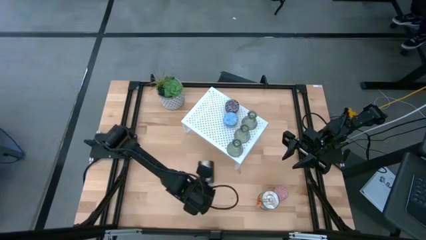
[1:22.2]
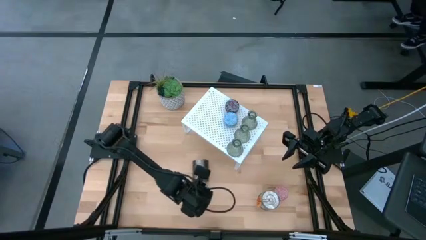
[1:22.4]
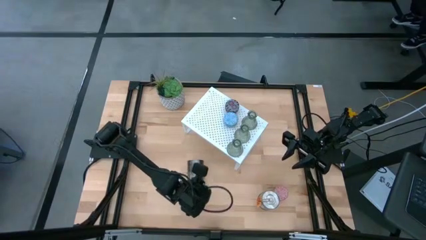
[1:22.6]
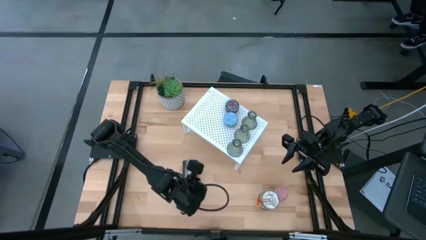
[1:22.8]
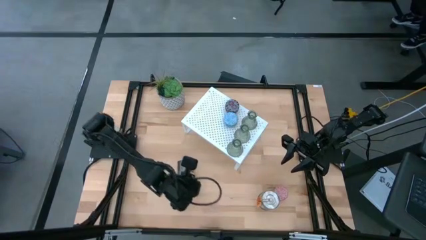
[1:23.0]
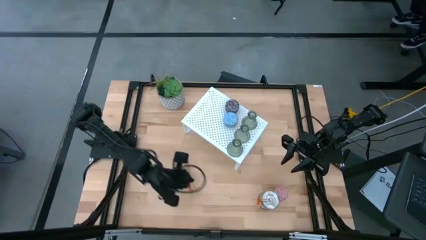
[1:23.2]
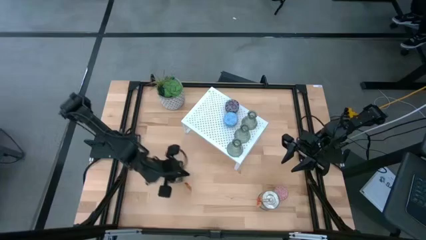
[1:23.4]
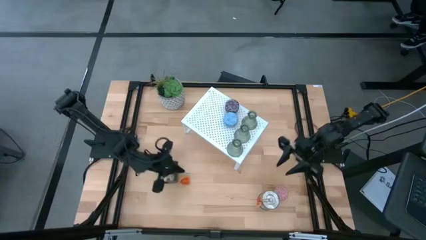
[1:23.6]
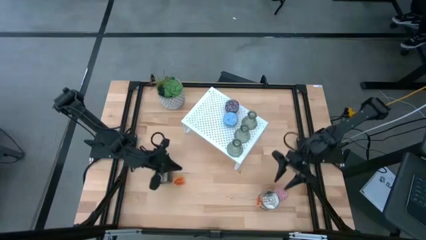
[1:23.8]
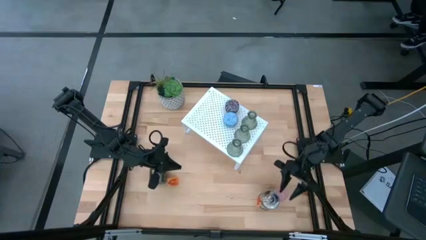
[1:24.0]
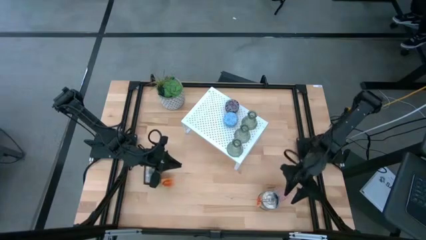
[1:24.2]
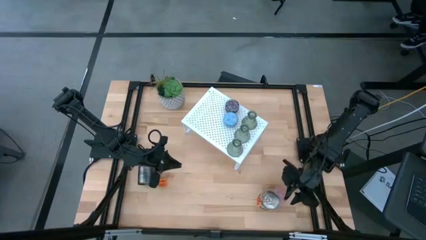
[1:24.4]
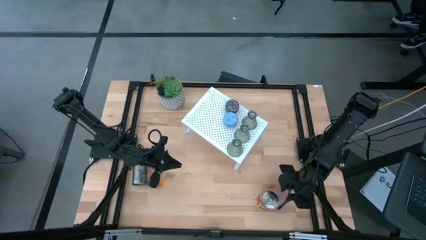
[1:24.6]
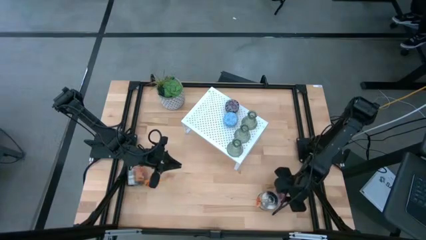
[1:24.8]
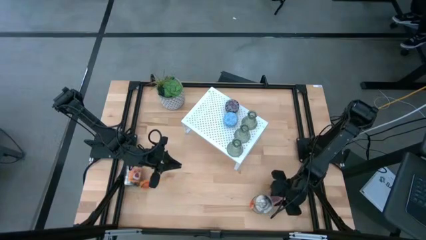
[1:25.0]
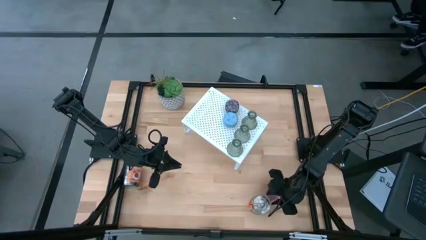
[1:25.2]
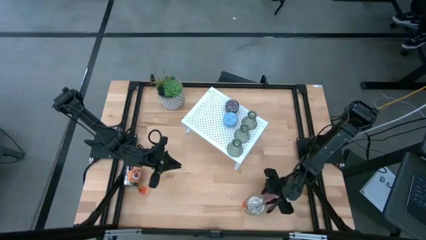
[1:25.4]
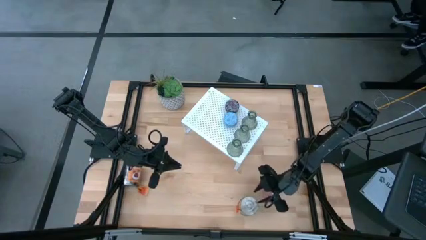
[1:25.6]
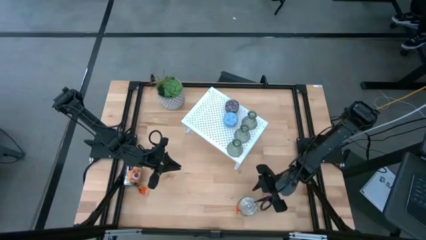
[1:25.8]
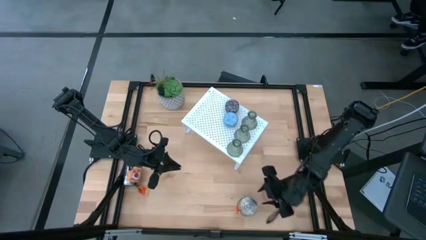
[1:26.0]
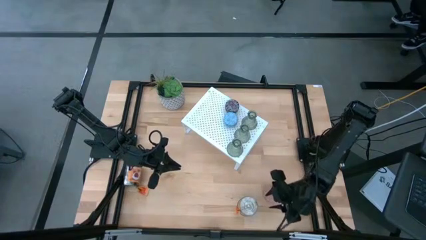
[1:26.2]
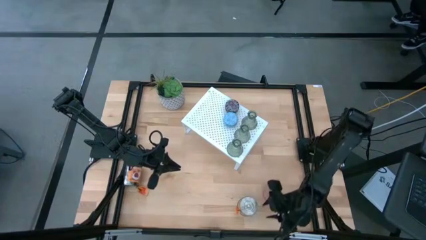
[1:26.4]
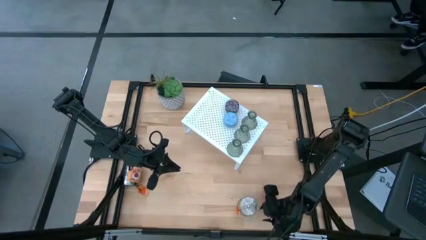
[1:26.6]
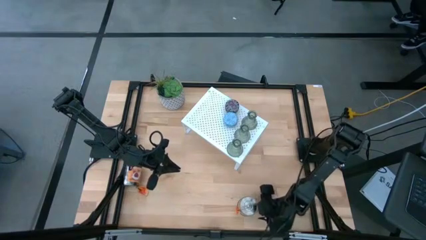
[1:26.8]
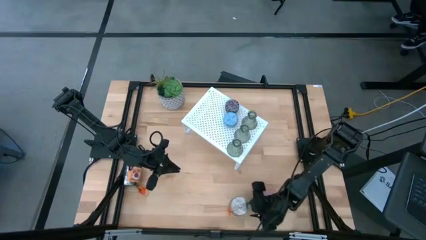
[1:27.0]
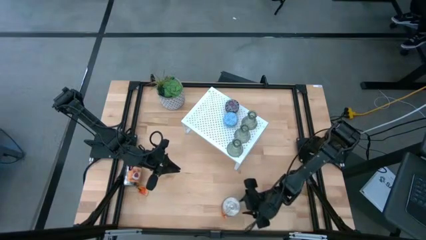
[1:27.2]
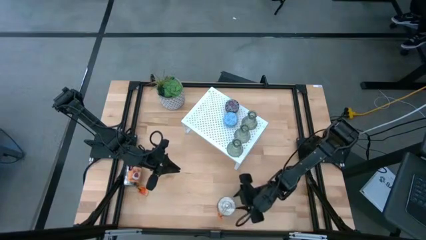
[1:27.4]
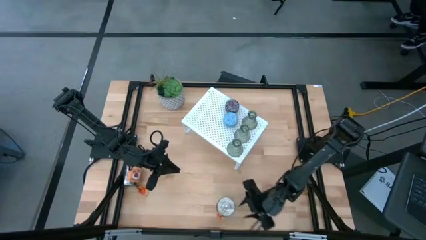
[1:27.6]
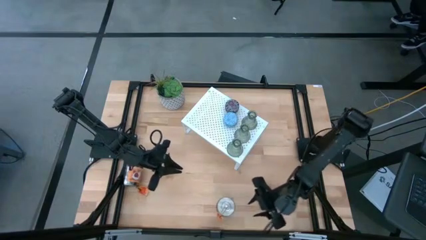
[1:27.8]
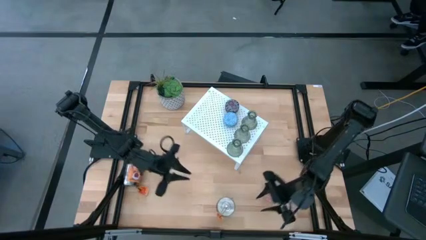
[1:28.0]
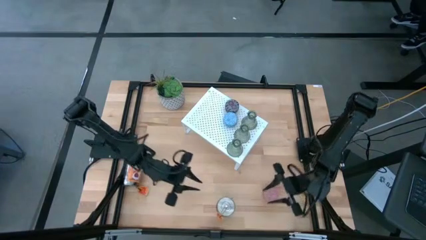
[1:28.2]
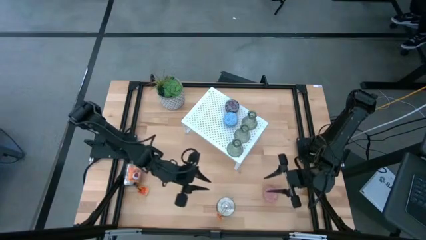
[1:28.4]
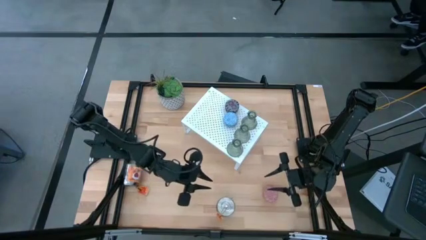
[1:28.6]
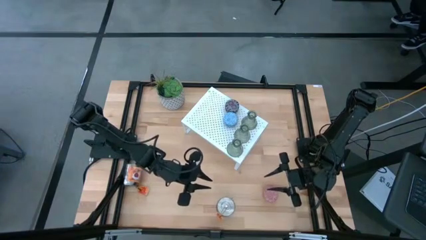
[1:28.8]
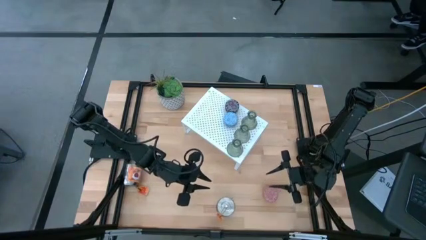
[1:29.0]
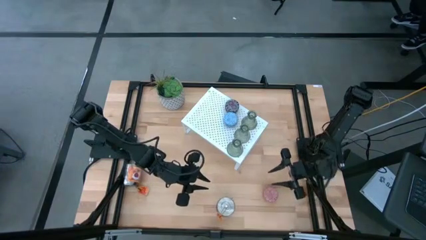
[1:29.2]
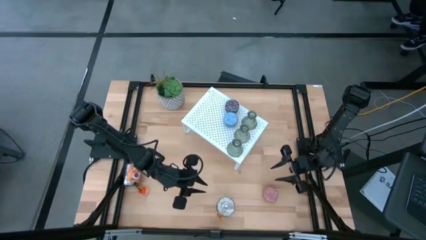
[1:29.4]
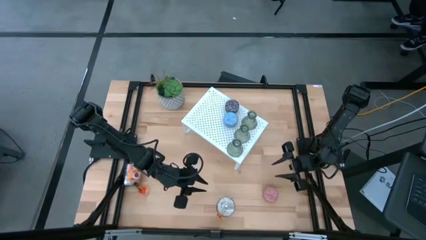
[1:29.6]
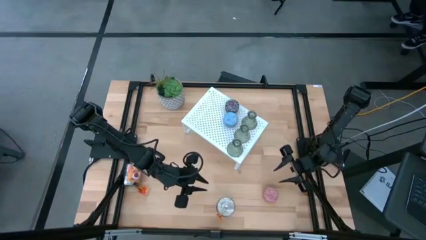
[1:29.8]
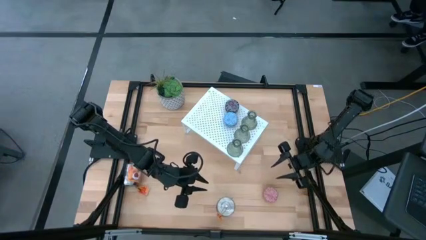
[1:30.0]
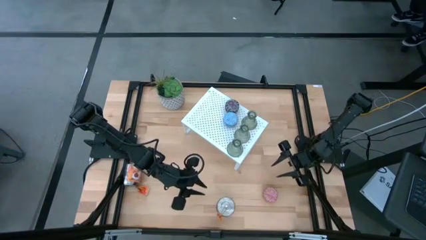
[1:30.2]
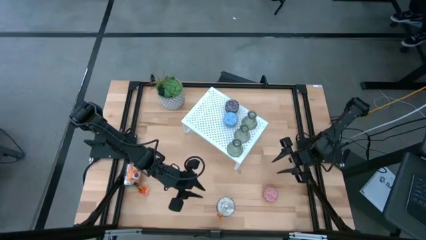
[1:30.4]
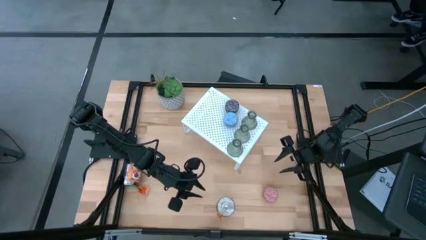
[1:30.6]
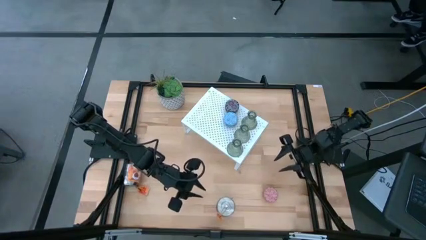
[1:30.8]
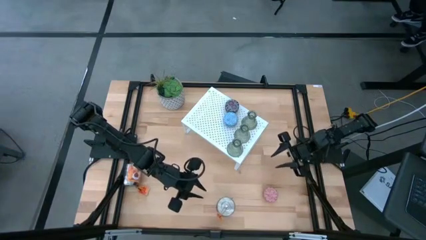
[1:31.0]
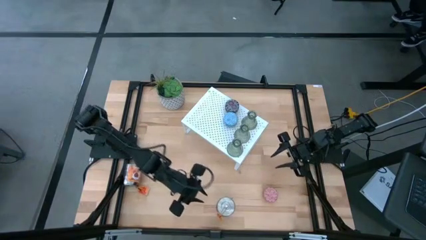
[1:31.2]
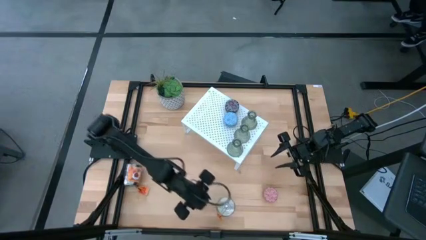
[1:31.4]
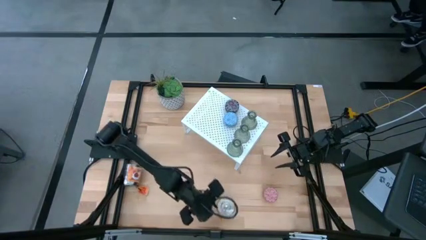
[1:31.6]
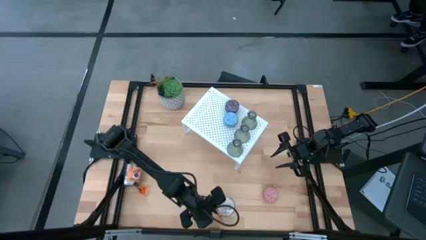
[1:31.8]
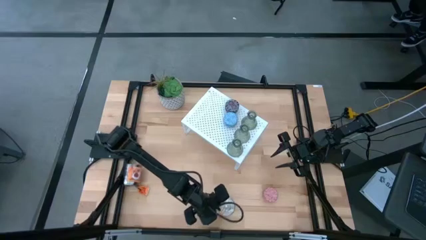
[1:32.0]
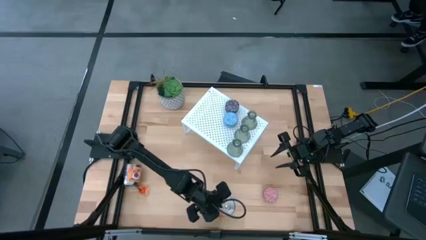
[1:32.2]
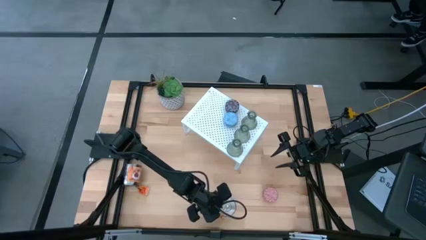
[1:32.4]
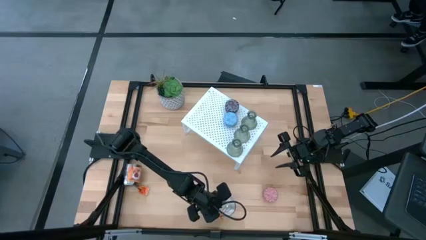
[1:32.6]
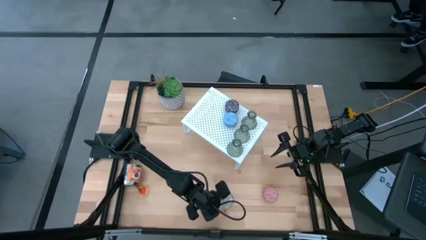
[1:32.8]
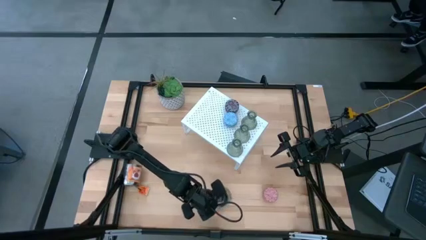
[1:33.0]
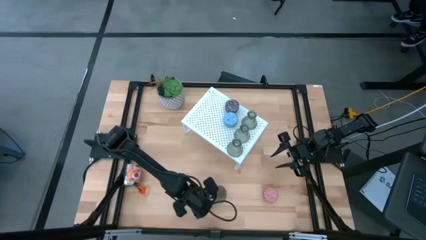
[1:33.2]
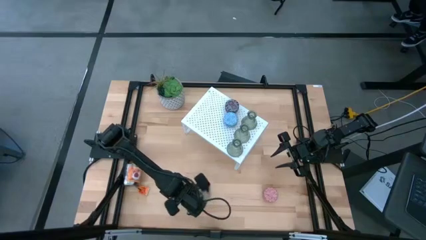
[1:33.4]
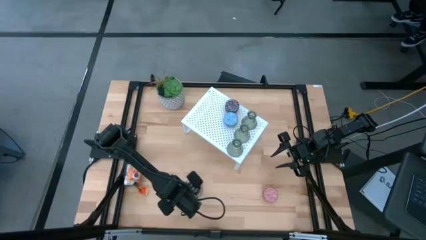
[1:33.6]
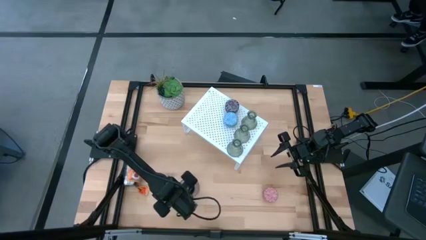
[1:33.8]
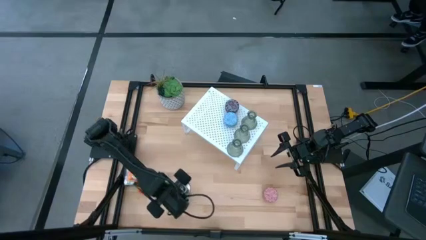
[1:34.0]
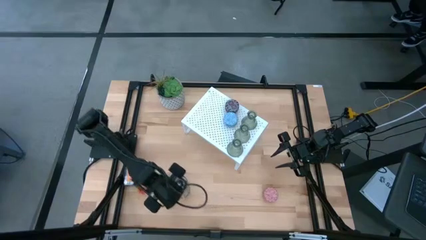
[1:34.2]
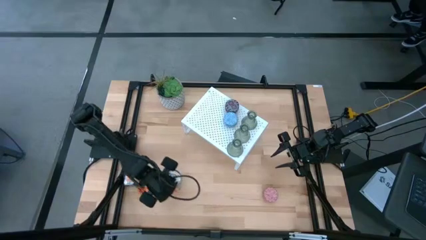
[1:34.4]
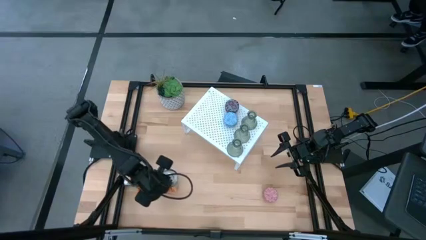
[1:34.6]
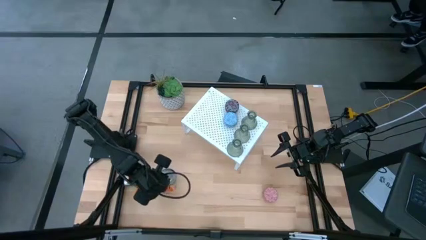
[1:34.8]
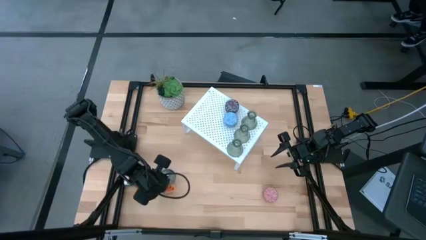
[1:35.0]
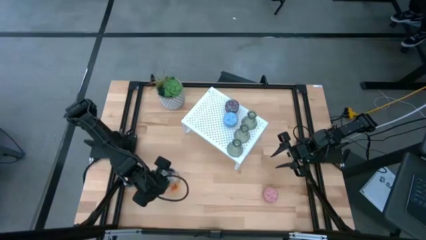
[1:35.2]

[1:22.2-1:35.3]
Task: Pick & Place candle stick holders
Move the right silver scented candle to the middle left of the table

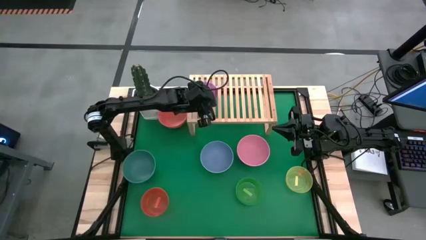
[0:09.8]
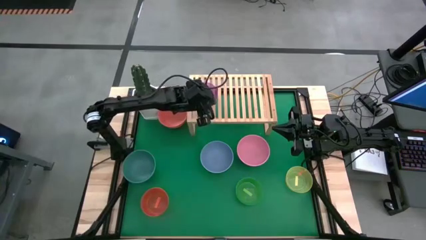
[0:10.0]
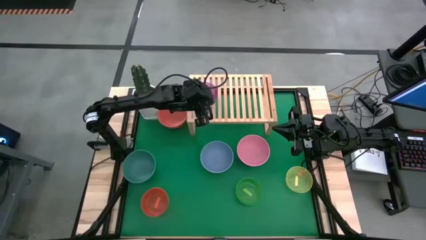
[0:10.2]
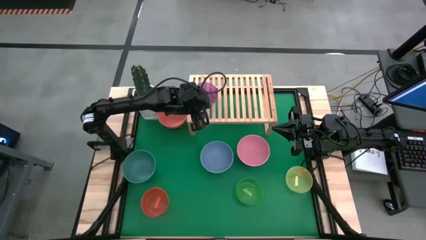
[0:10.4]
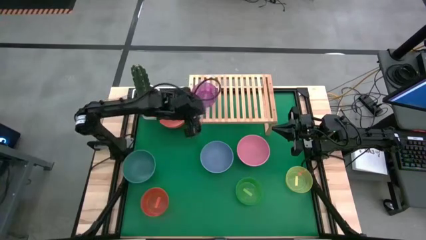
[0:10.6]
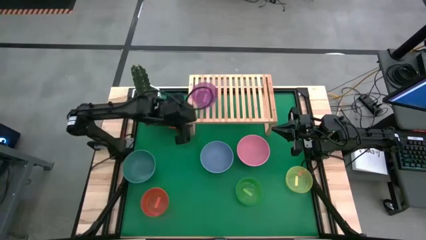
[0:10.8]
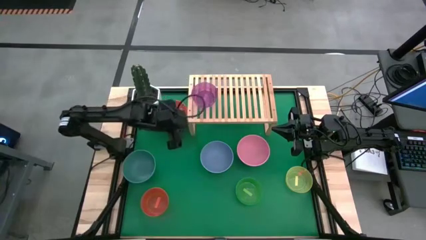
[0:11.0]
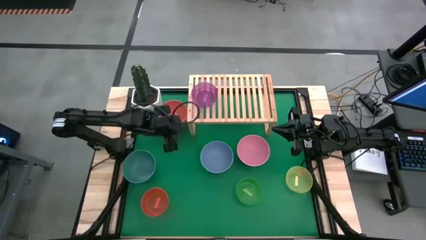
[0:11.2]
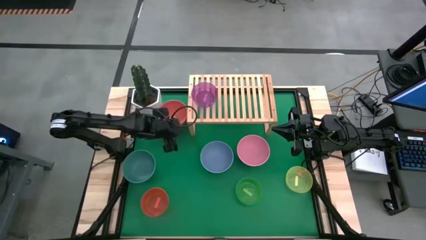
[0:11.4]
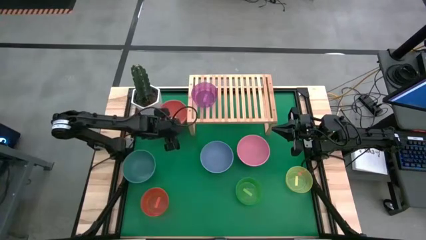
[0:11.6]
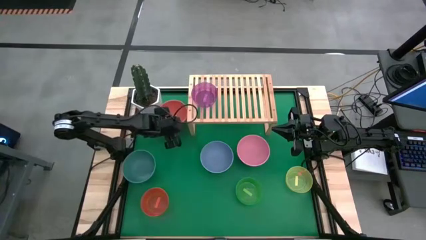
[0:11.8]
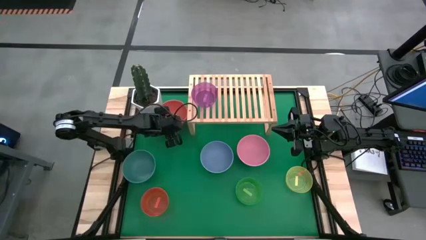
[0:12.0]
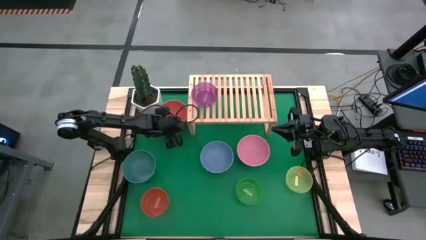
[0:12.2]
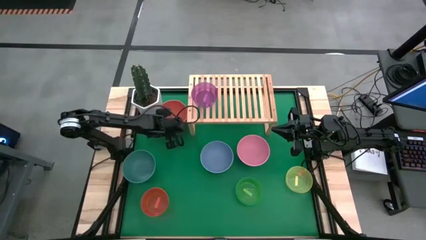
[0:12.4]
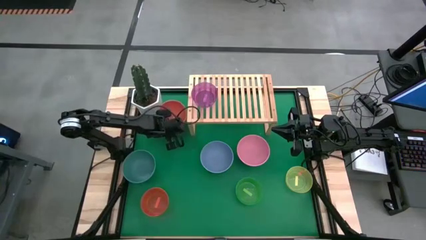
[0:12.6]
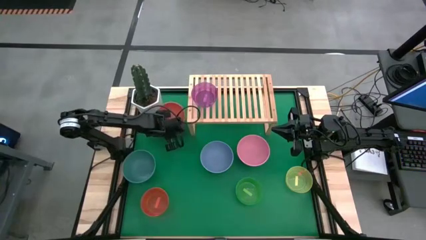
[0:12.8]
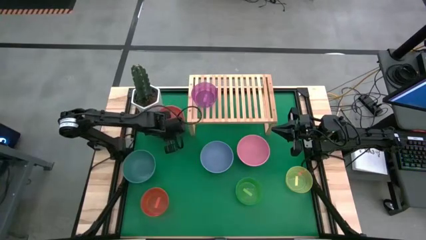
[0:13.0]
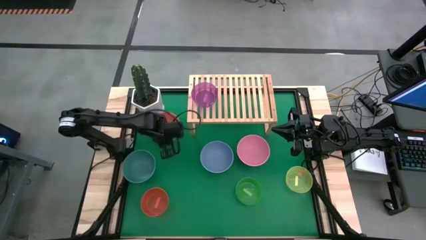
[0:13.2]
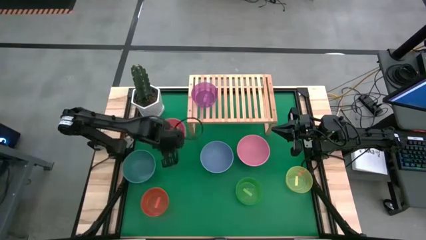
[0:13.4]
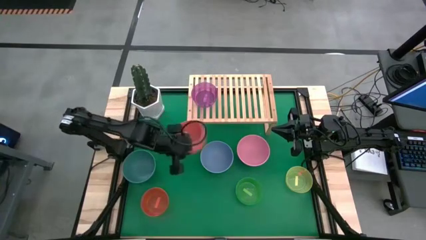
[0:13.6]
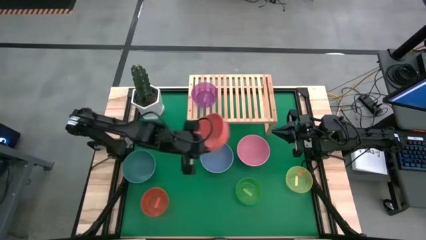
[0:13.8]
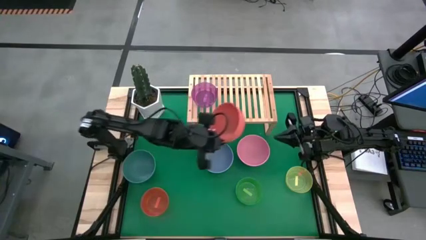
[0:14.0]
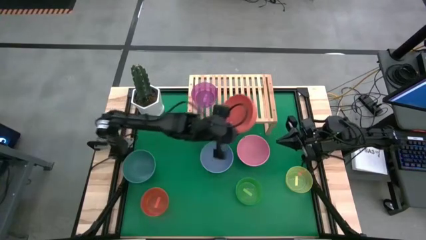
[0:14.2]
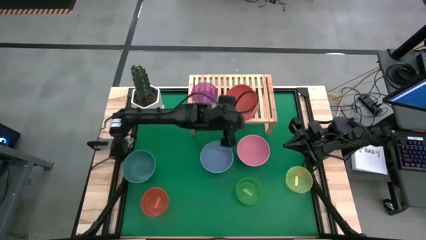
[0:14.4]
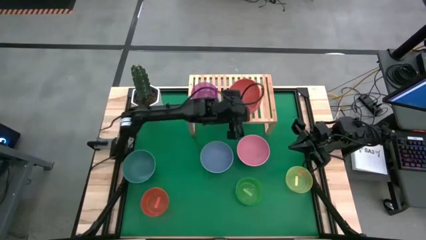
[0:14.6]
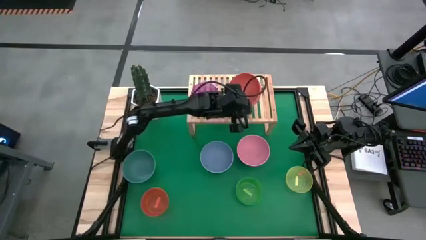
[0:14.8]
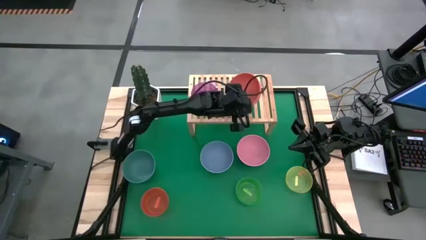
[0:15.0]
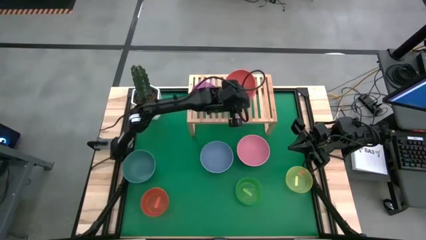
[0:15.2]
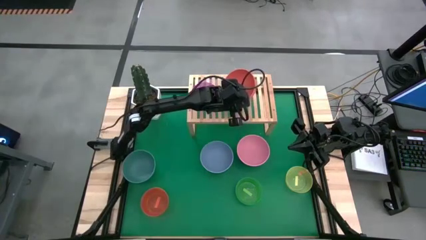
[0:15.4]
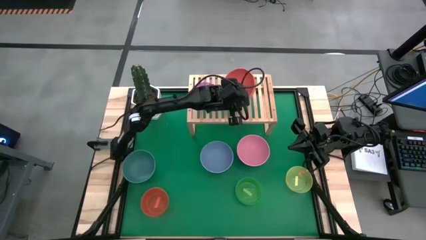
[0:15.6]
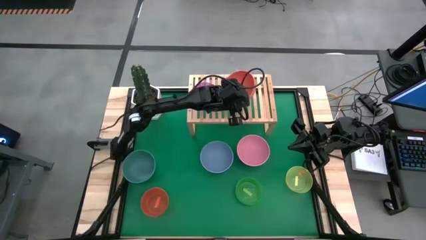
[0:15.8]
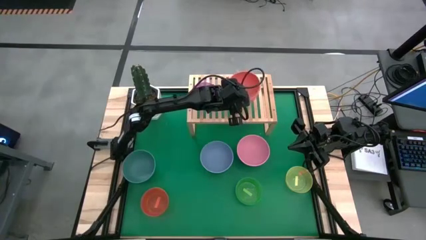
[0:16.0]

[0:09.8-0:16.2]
Task: Place and stack bowls onto a shelf
Put the orange bowl on the shelf
